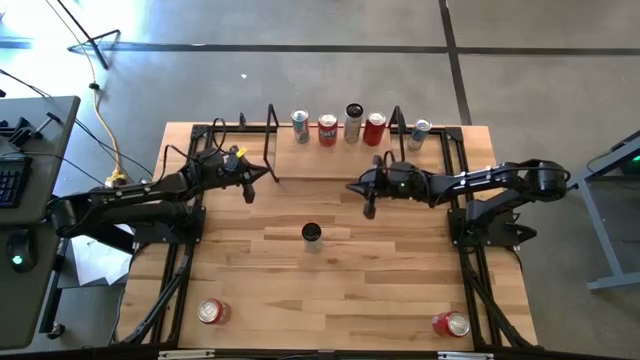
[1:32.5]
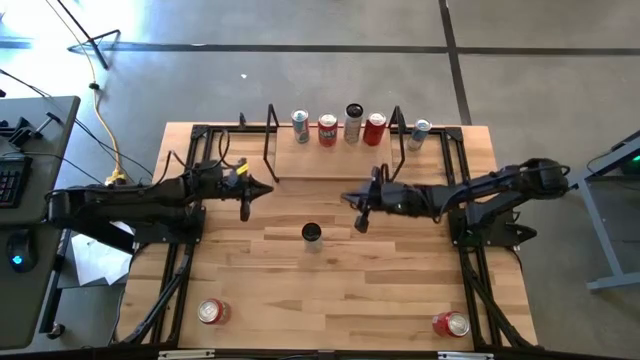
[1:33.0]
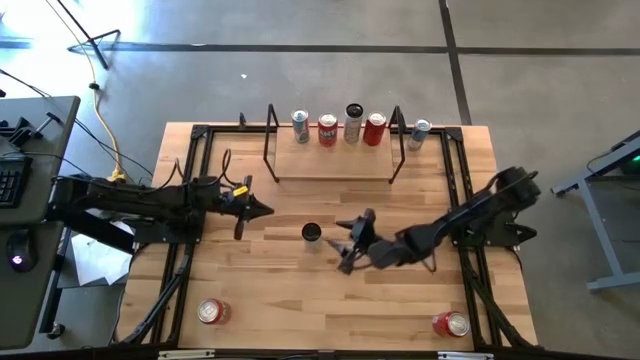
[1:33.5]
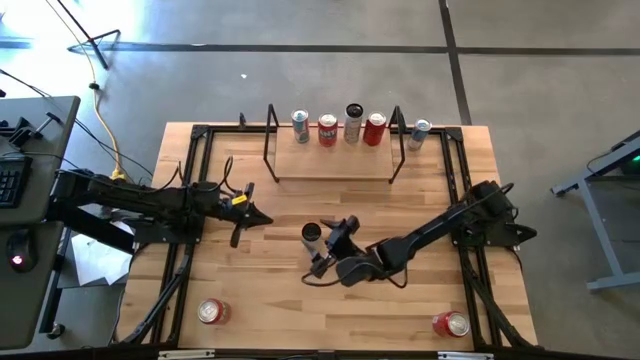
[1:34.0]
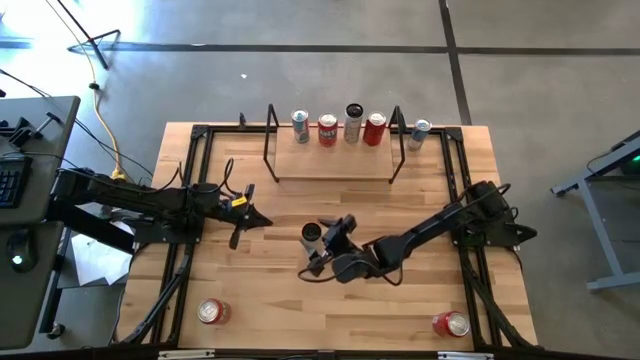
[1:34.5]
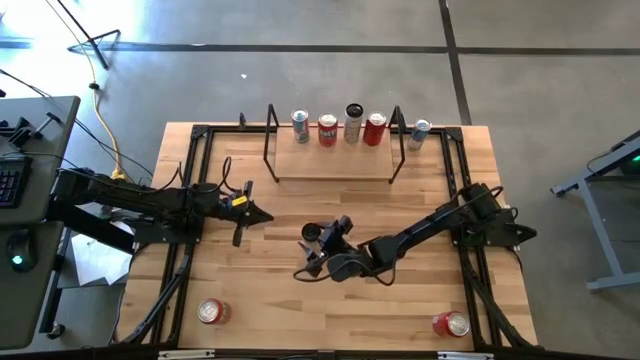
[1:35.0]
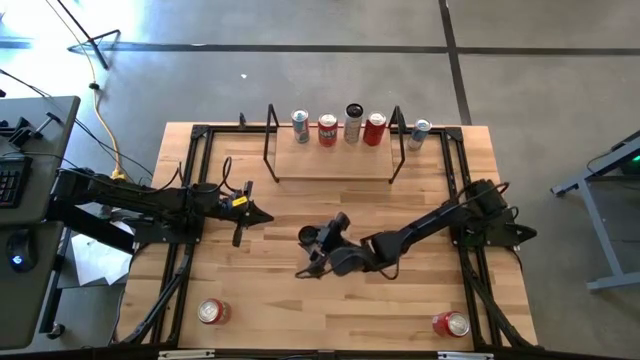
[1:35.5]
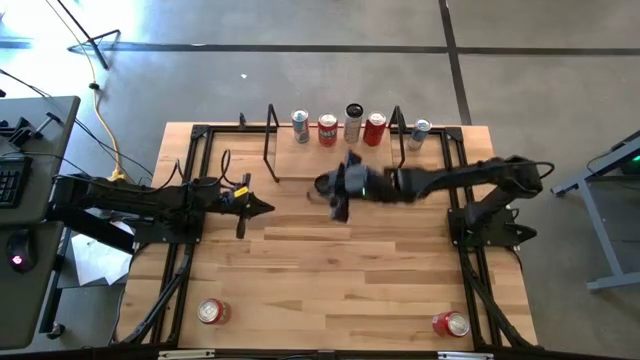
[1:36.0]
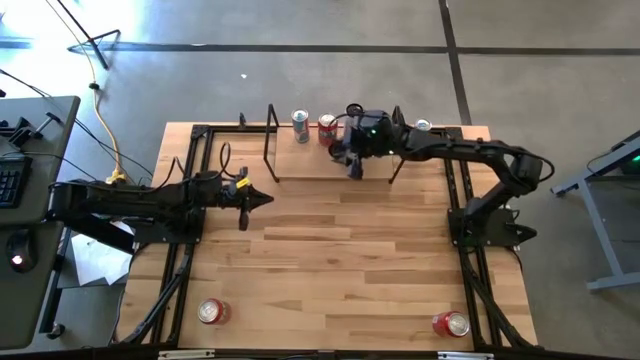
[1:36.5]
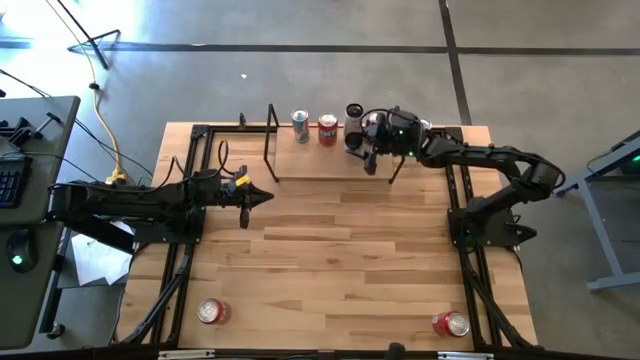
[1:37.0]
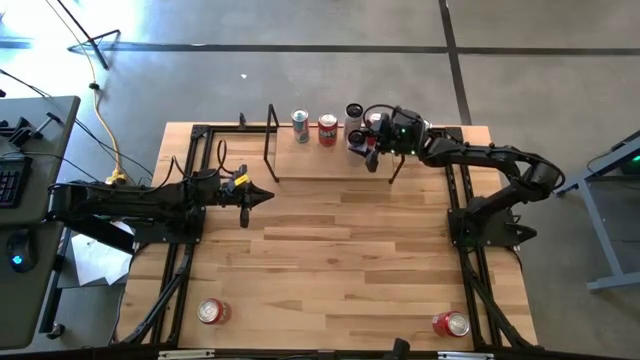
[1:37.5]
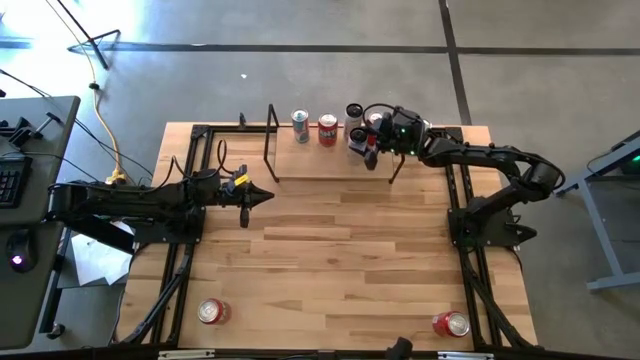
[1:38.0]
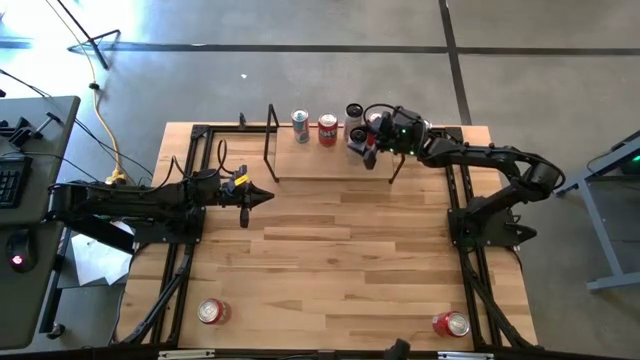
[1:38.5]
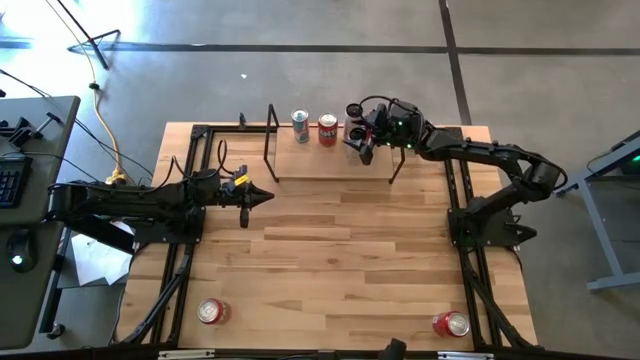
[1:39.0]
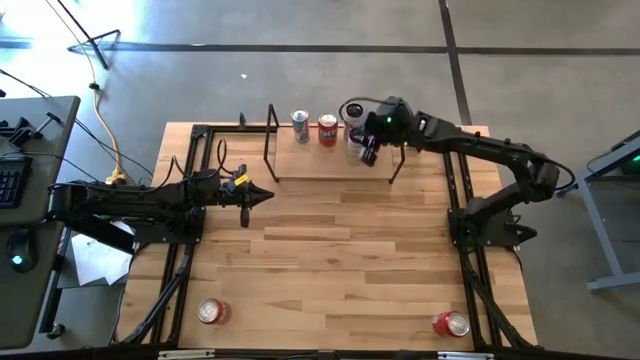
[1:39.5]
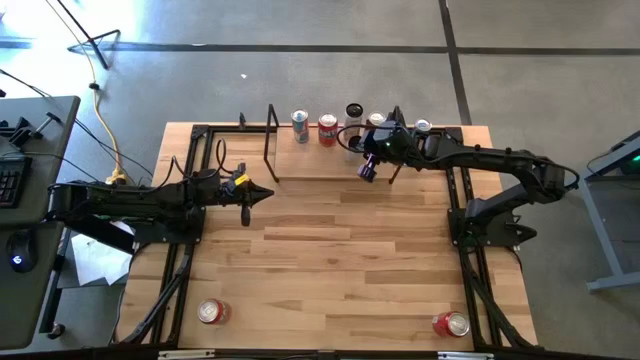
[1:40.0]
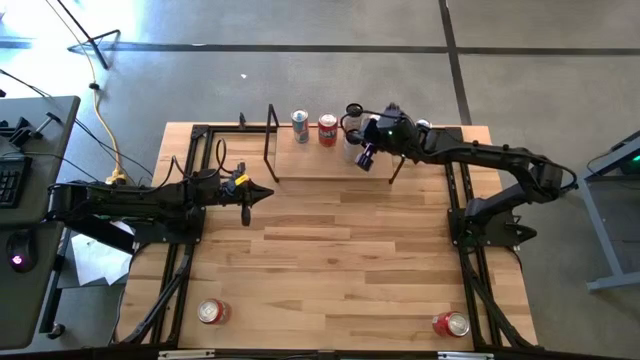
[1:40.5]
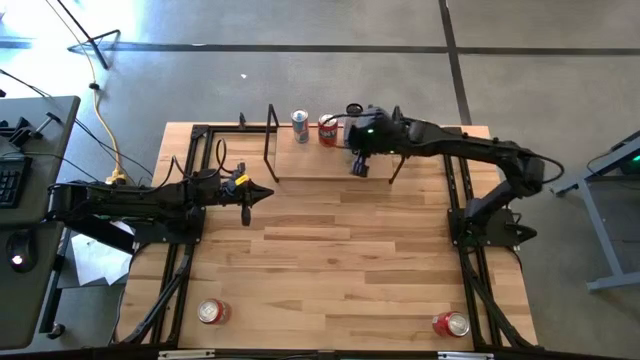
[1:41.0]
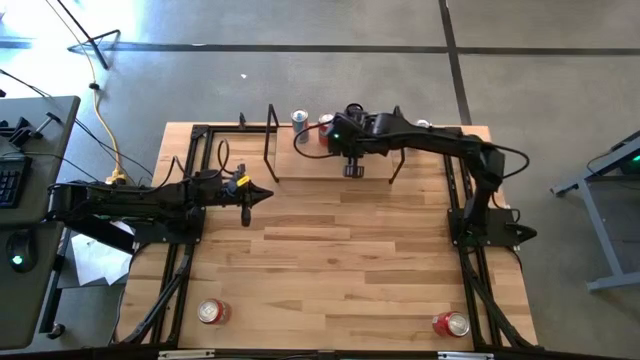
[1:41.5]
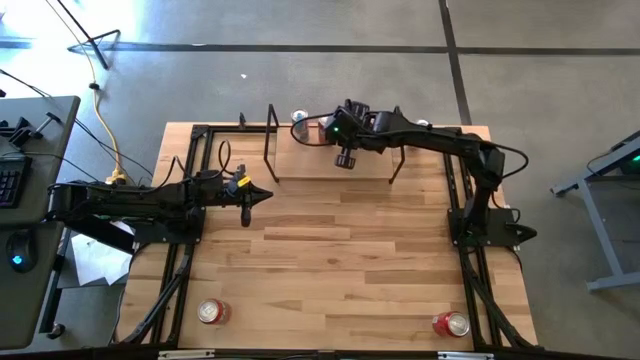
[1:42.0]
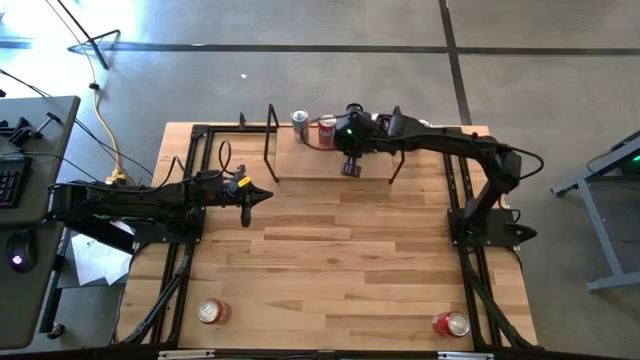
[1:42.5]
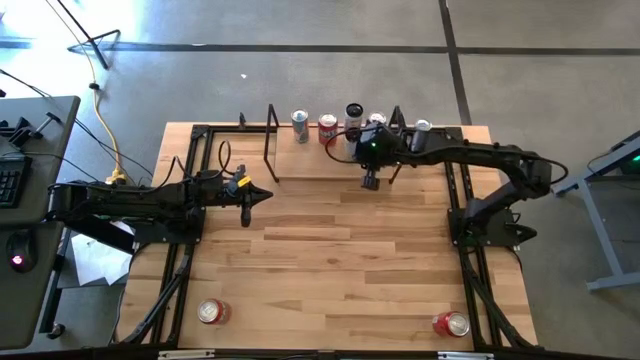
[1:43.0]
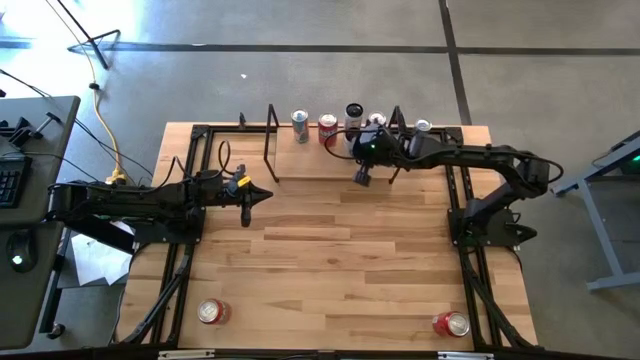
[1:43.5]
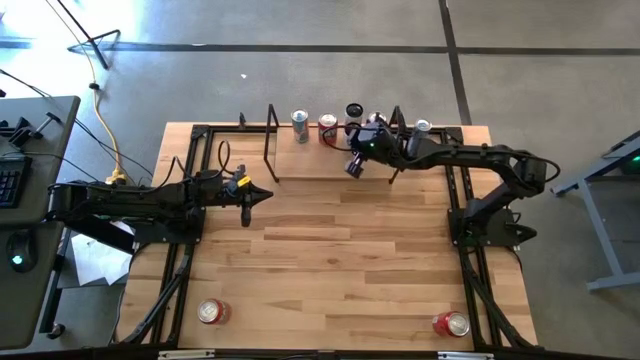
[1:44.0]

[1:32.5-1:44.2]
Task: Place canned beverage on shelf
Put the white-yellow soda can on the shelf aligned with the other white-yellow soda can

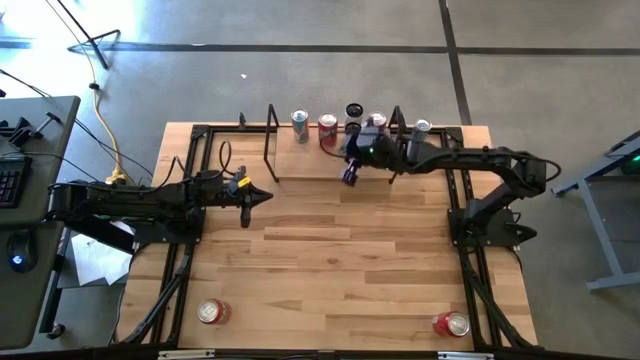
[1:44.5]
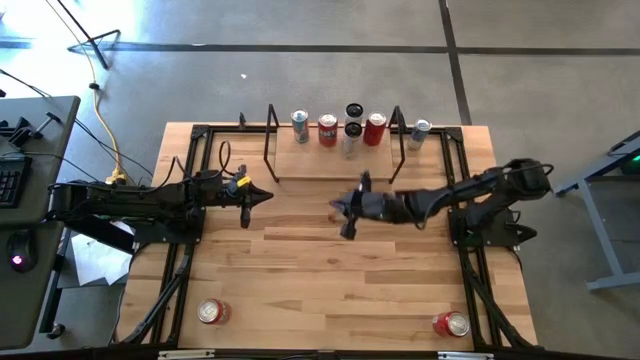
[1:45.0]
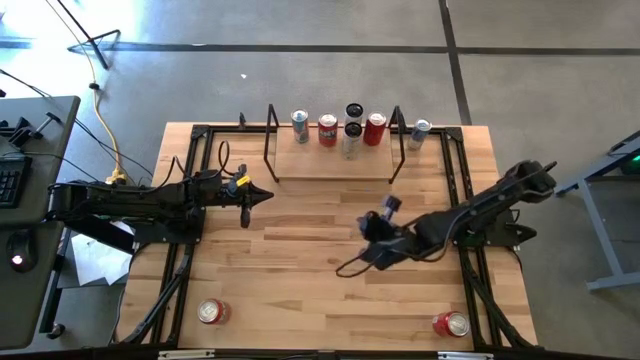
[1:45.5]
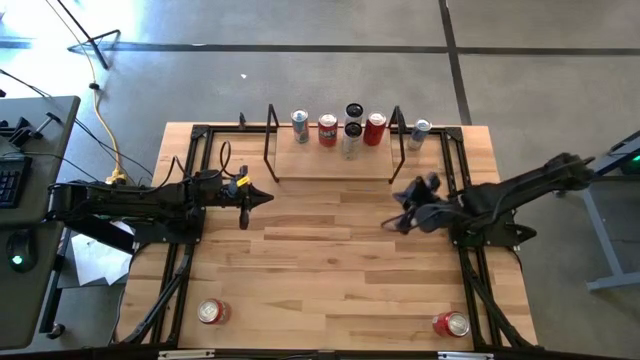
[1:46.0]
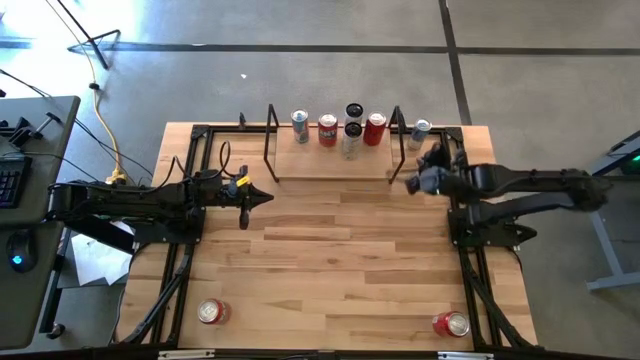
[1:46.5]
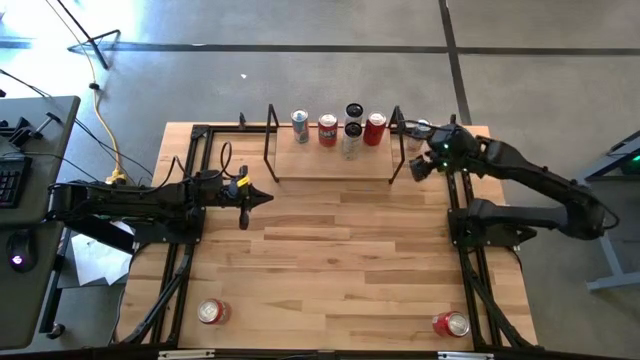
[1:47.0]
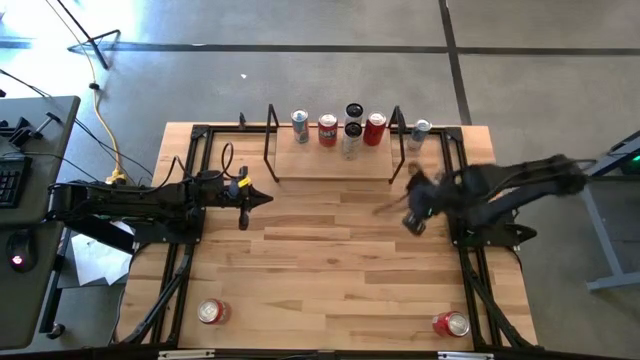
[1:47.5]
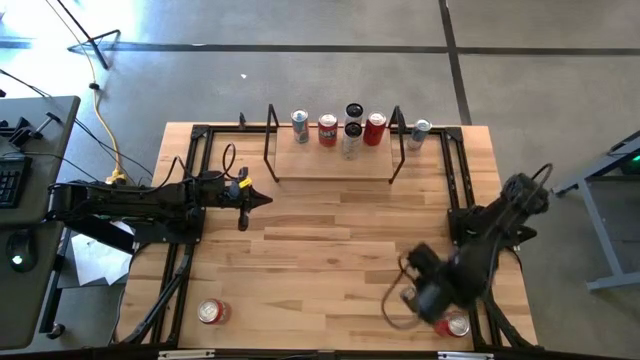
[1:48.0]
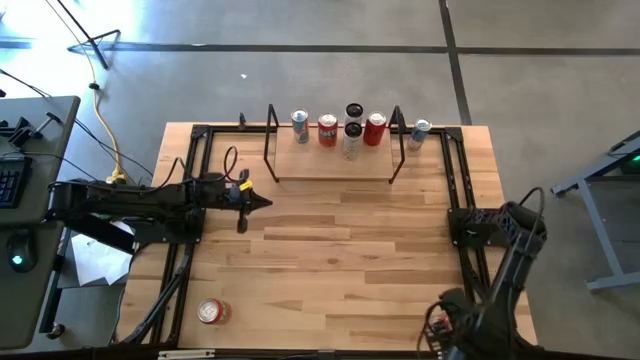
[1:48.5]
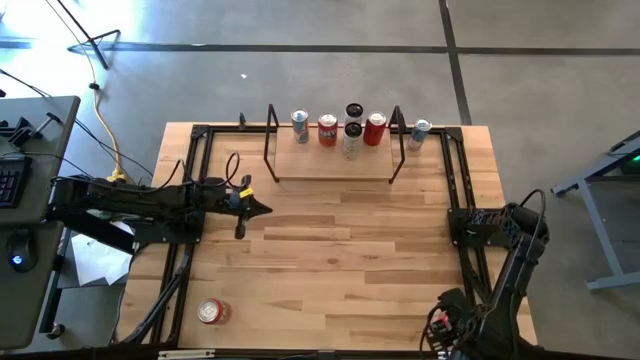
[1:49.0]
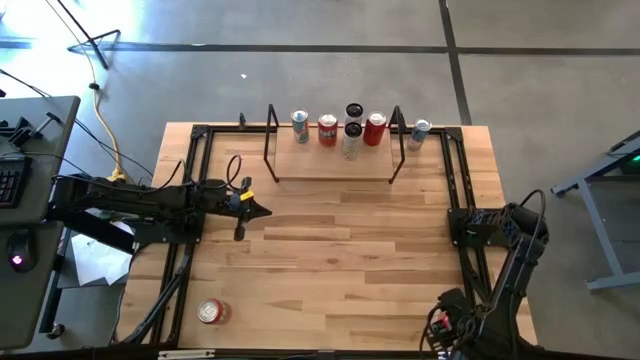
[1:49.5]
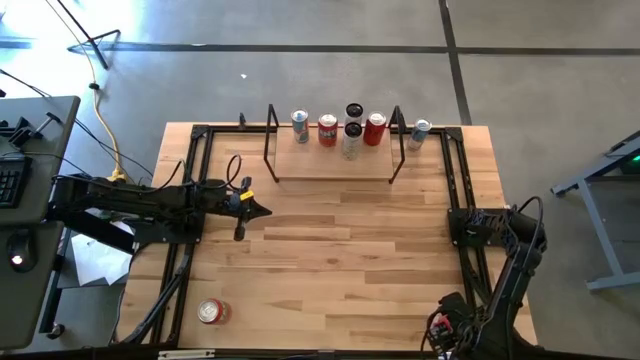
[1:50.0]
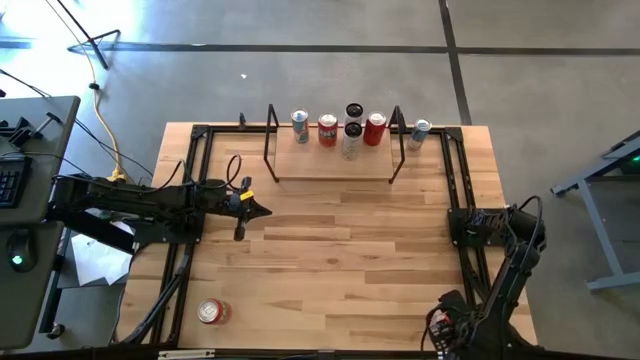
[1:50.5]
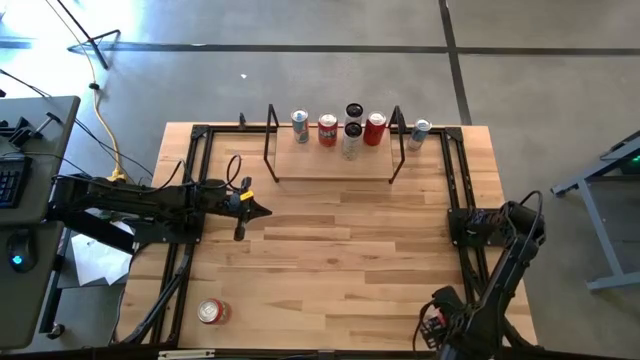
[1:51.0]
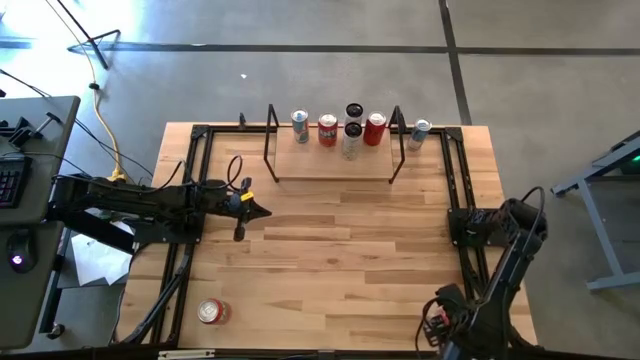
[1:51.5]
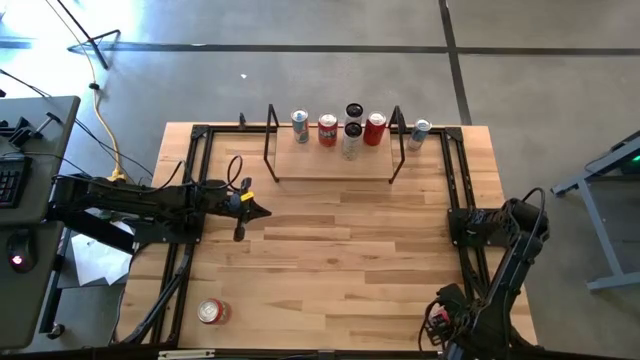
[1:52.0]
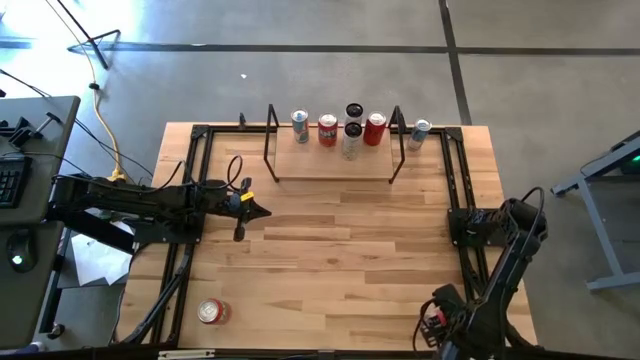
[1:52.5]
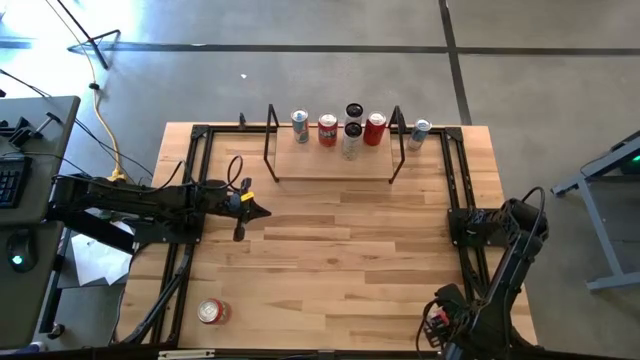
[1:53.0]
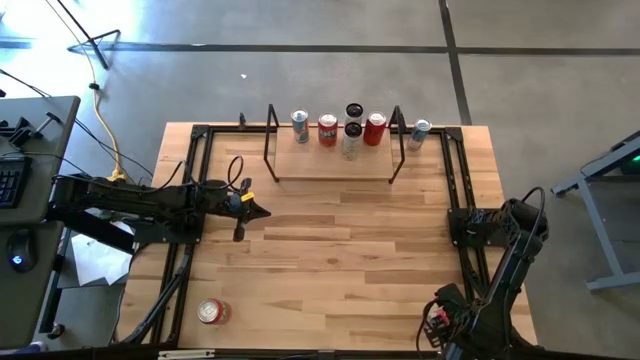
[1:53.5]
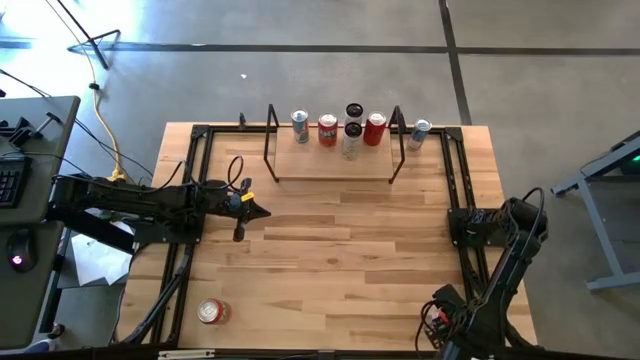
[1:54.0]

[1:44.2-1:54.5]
Put the red-black soda can on the shelf aligned with the other red-black soda can
